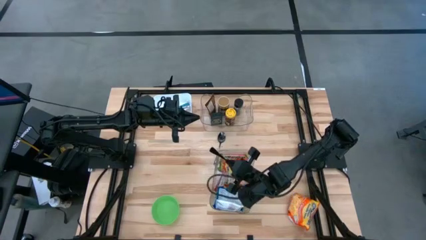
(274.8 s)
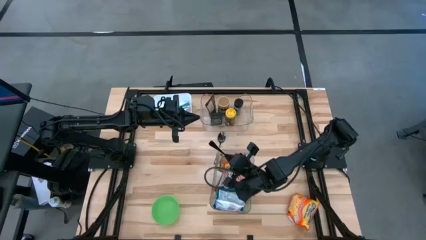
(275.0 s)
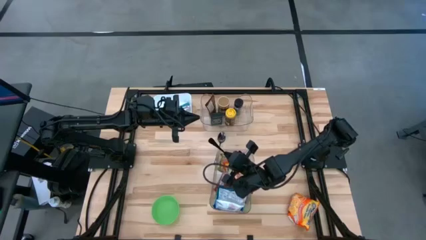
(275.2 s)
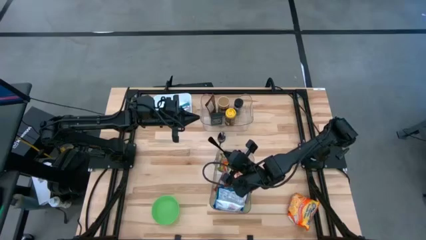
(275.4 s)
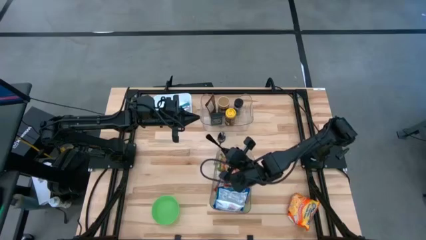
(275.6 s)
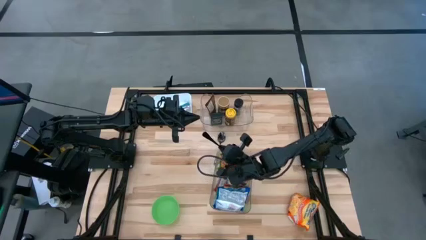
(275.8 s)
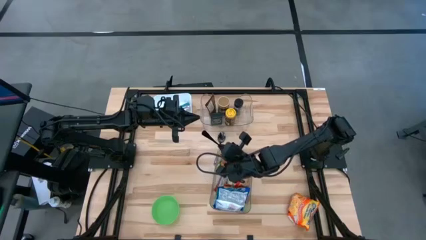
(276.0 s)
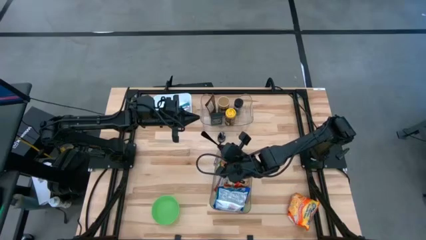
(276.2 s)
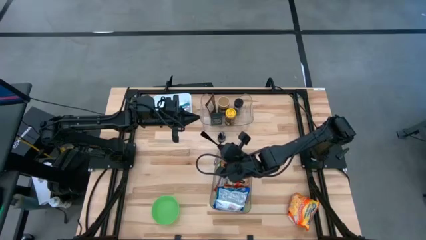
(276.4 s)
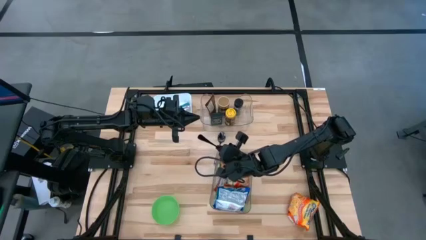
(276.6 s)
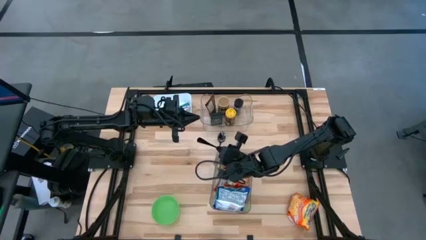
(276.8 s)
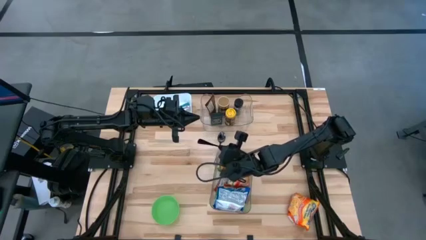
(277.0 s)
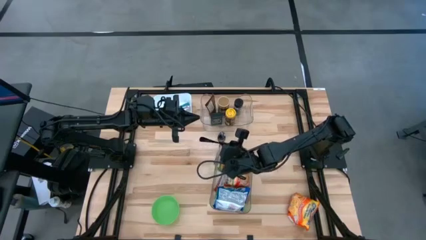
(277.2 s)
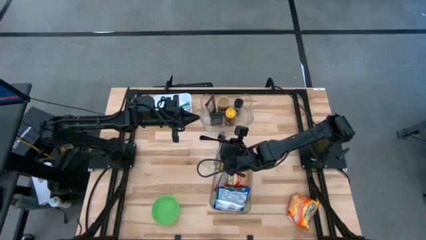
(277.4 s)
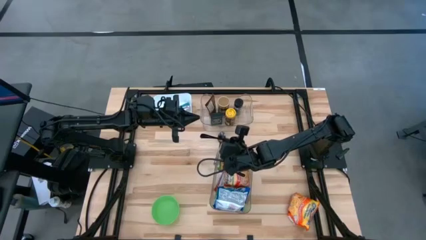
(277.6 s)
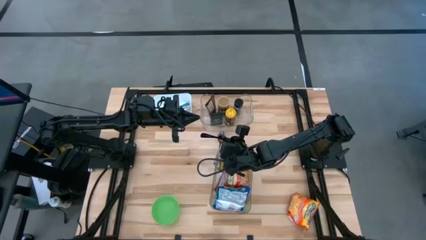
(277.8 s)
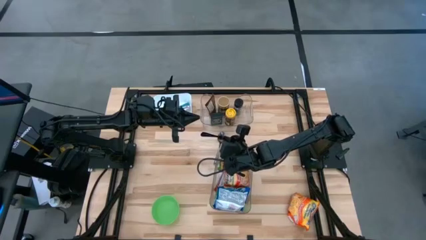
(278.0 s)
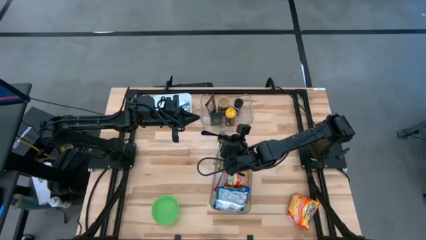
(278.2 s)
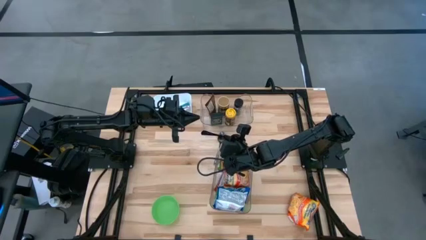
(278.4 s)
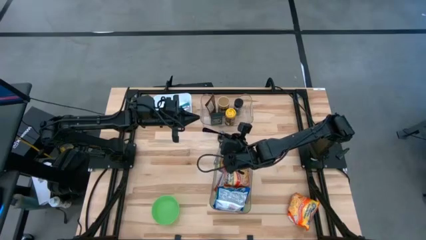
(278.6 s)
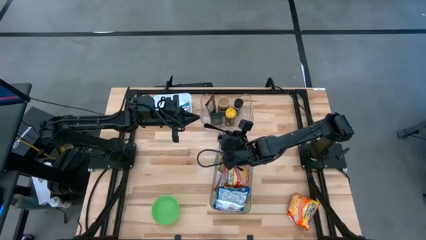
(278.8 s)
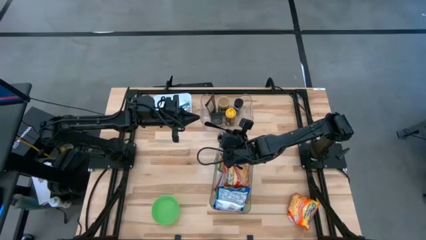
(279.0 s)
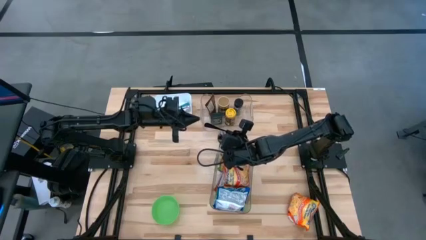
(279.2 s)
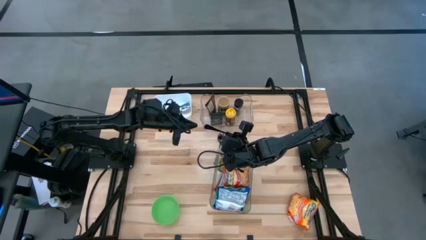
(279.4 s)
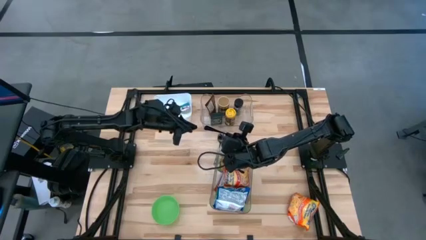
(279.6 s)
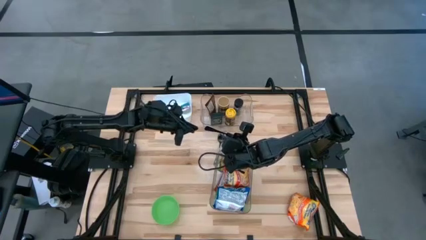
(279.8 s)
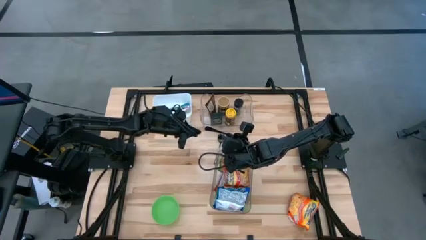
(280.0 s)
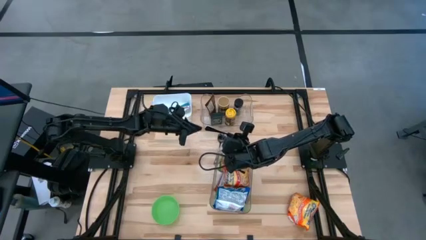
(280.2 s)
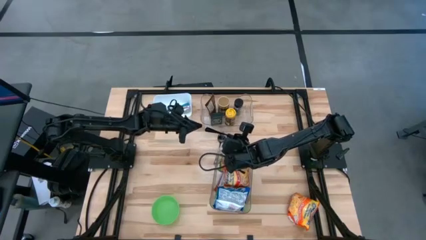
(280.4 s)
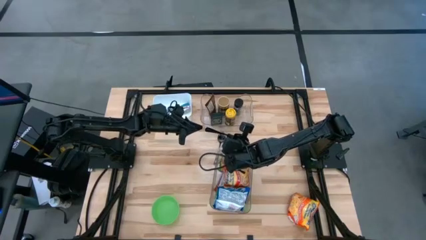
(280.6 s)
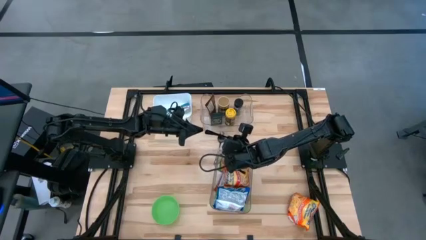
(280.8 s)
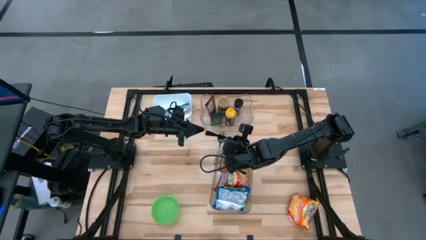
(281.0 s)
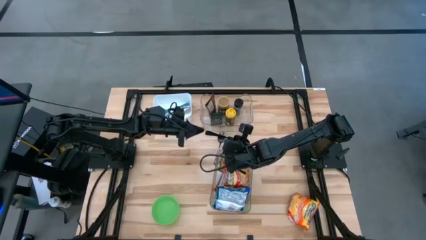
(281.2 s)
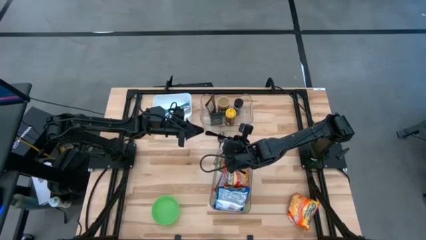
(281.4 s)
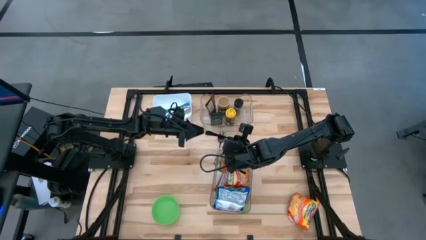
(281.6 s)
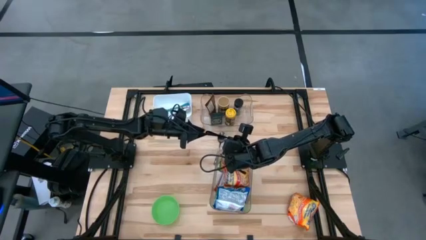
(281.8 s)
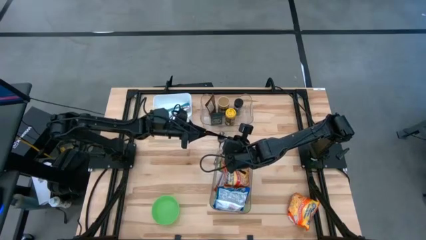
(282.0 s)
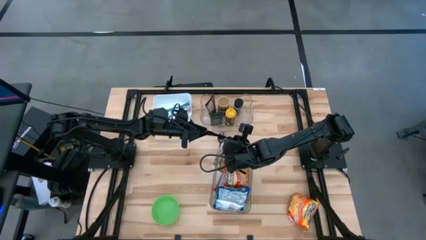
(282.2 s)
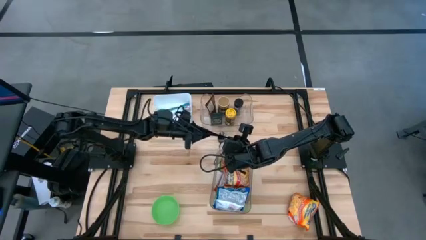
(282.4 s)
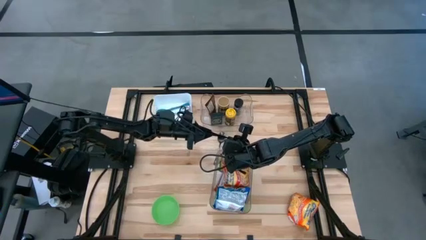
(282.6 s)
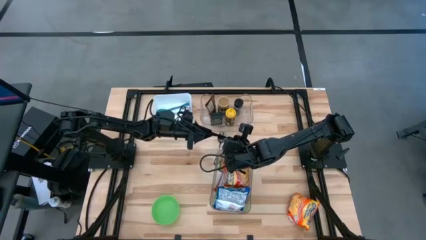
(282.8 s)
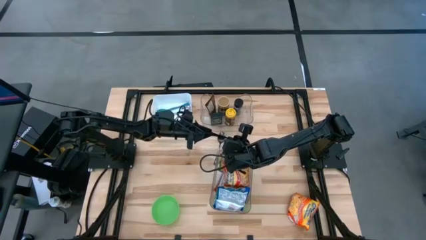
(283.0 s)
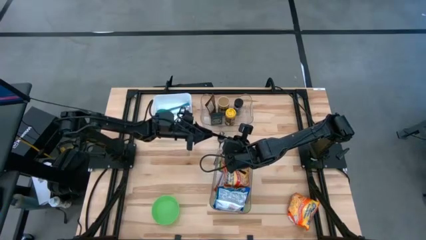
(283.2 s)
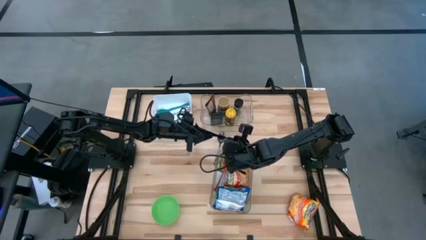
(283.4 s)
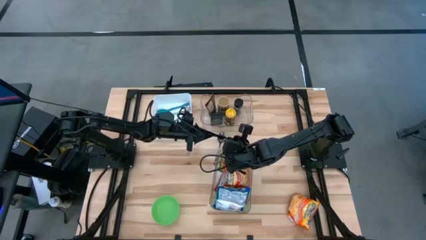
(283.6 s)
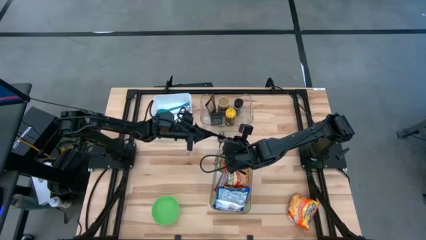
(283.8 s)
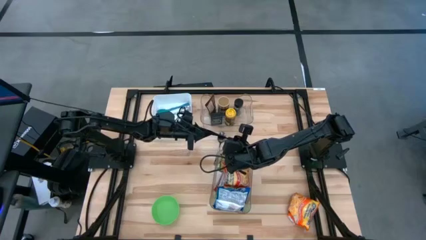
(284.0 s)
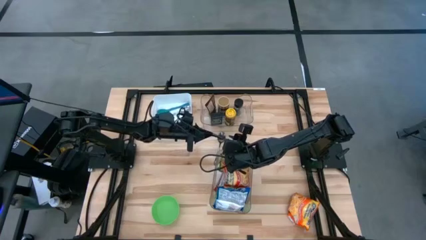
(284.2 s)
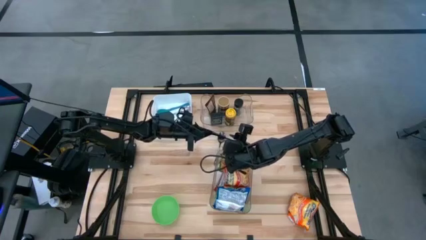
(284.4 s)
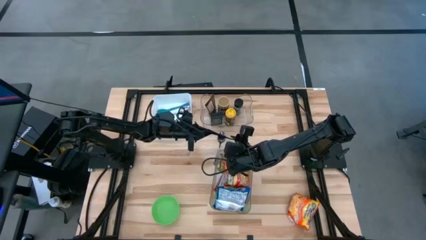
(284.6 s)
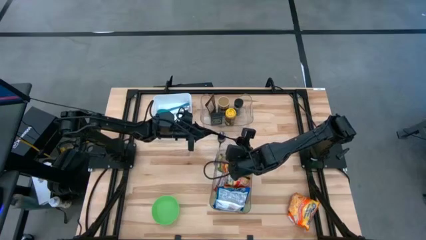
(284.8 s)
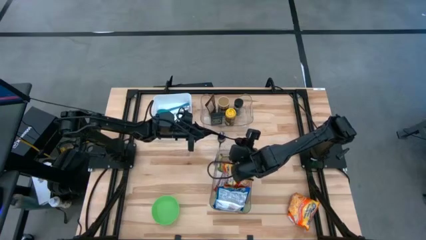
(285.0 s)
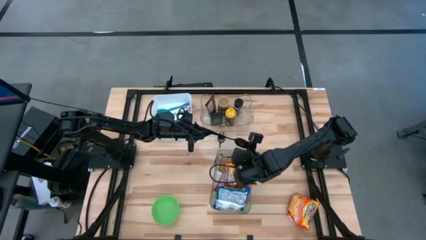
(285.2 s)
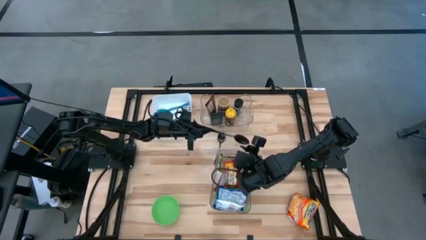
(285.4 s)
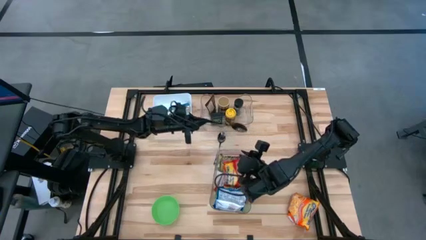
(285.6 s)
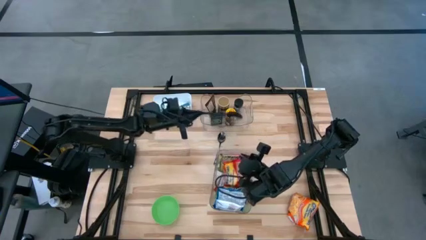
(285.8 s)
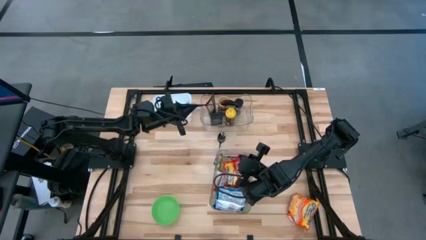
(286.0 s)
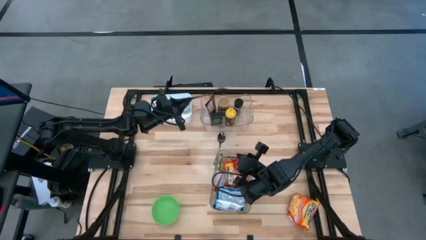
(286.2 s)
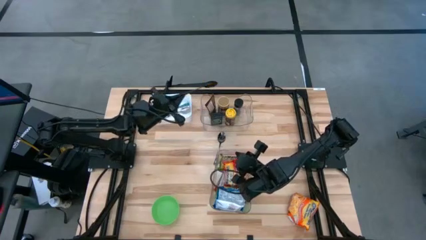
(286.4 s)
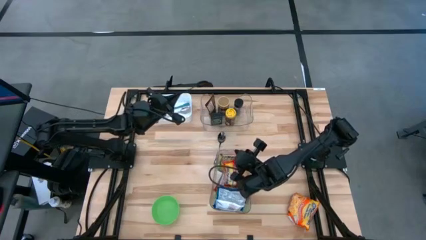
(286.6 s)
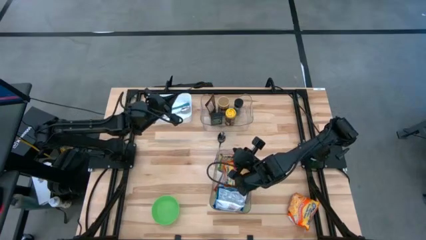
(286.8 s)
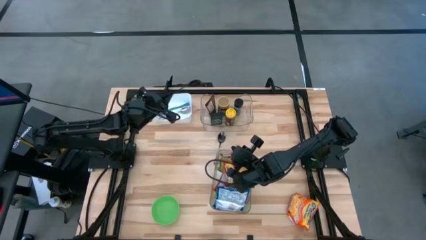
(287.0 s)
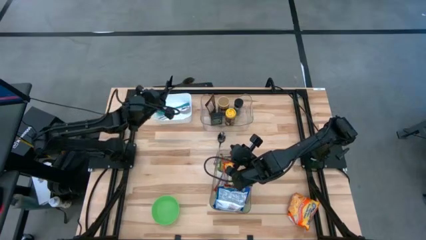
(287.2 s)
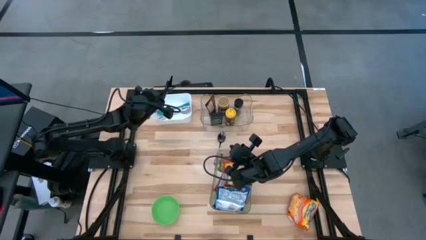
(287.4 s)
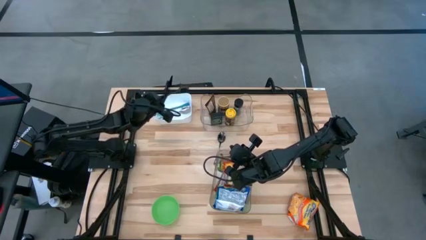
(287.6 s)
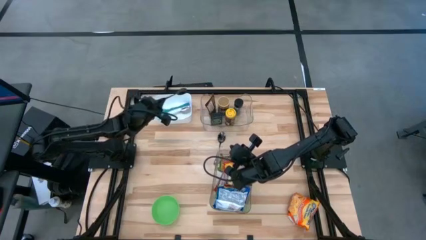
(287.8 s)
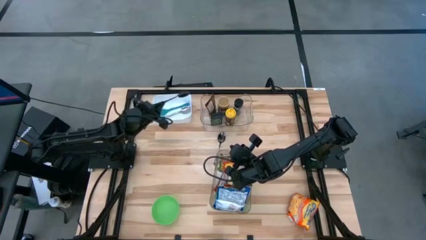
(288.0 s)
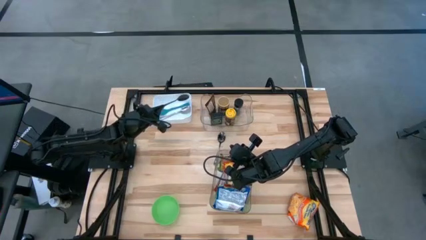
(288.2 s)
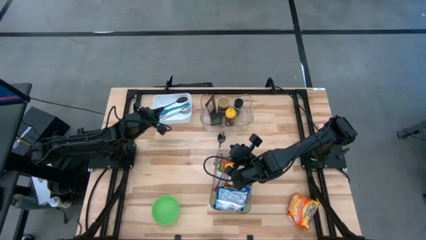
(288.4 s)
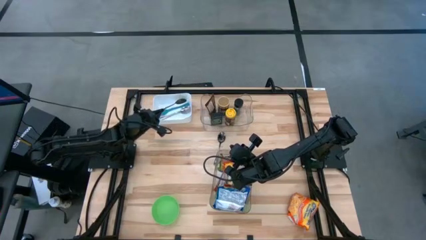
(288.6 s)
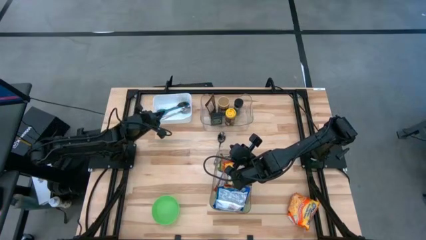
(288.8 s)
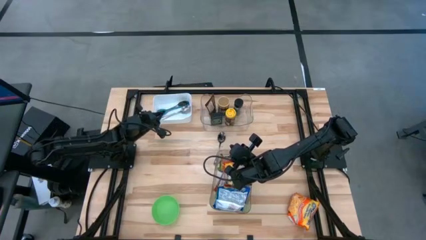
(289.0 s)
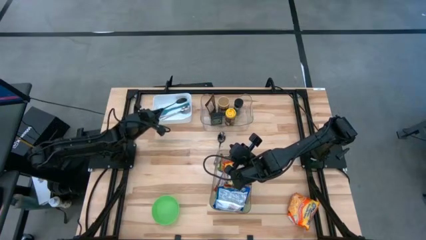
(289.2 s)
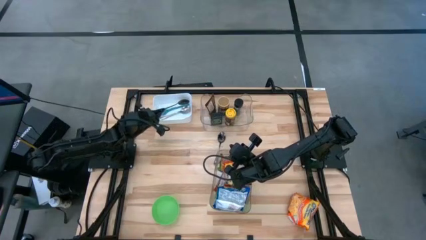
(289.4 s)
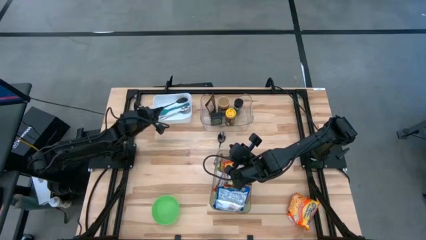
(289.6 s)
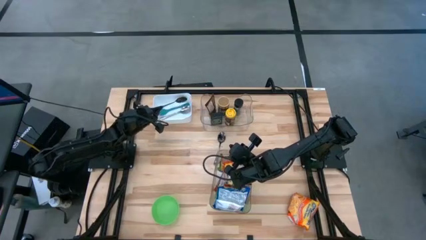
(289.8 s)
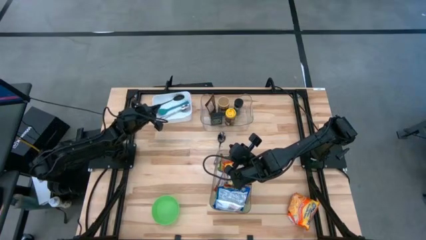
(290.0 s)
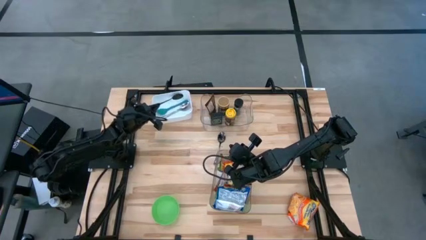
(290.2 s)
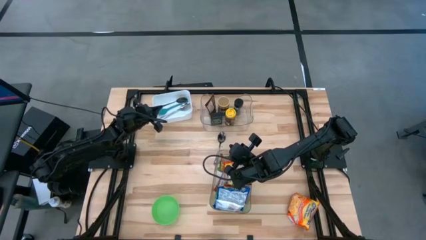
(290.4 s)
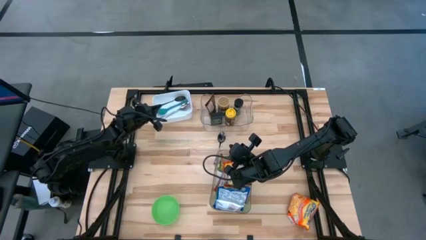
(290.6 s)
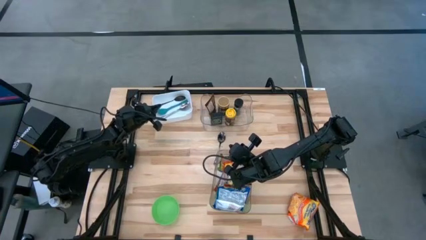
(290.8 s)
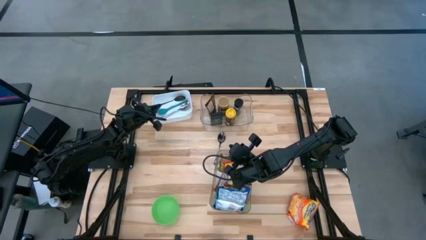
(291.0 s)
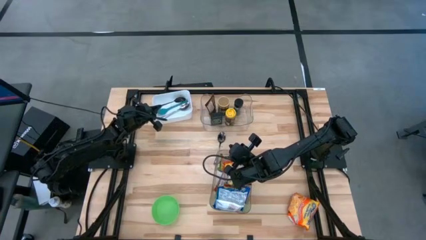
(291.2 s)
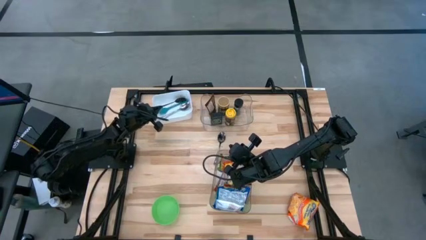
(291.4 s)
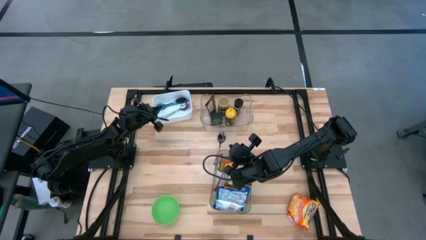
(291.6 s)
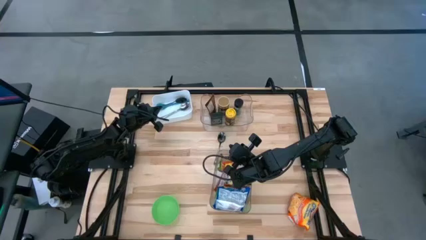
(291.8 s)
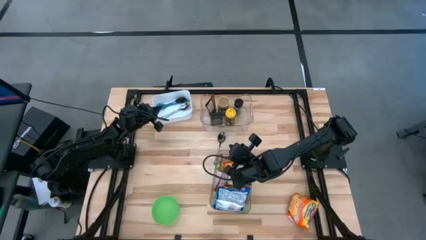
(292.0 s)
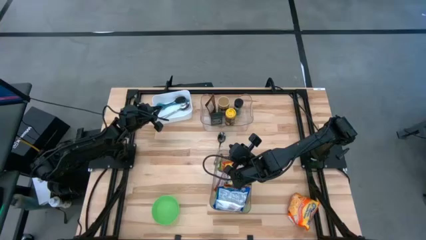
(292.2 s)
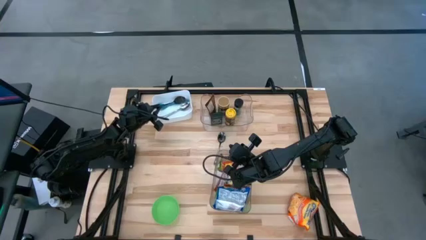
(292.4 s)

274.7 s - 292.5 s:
Task: Pick & Place Food Item
Put the bottom black spoon into the white bin
